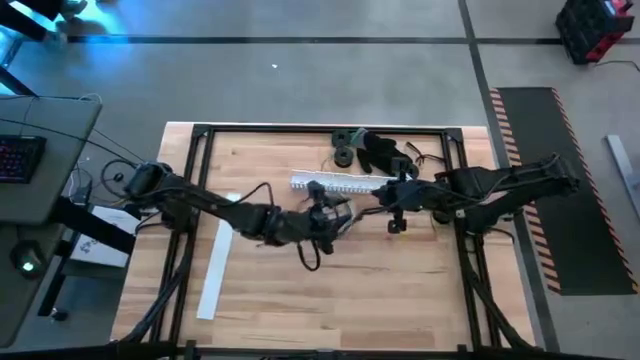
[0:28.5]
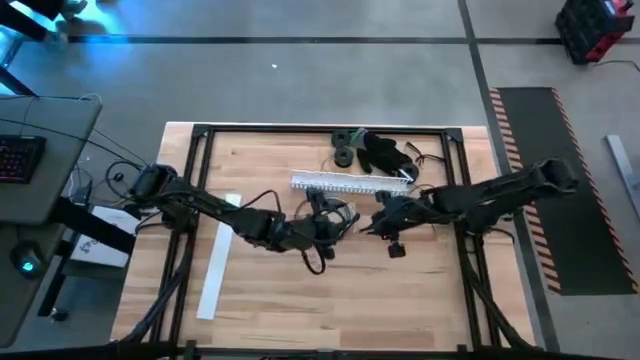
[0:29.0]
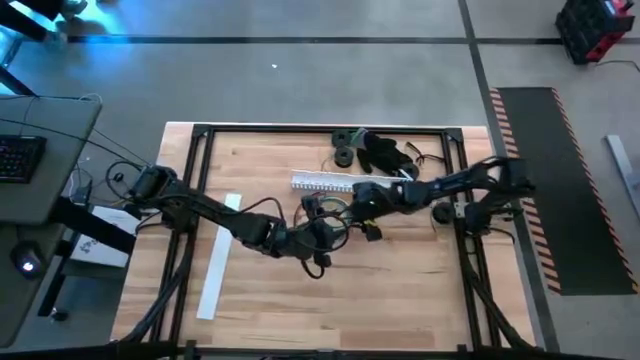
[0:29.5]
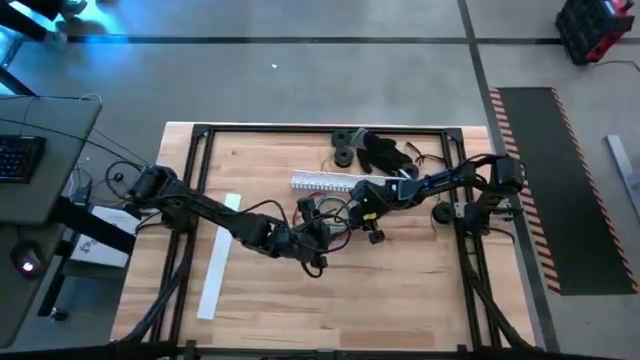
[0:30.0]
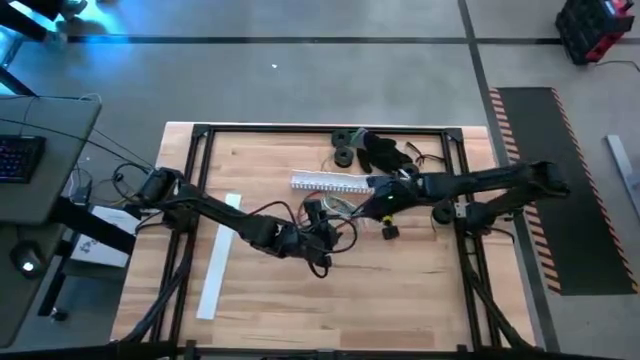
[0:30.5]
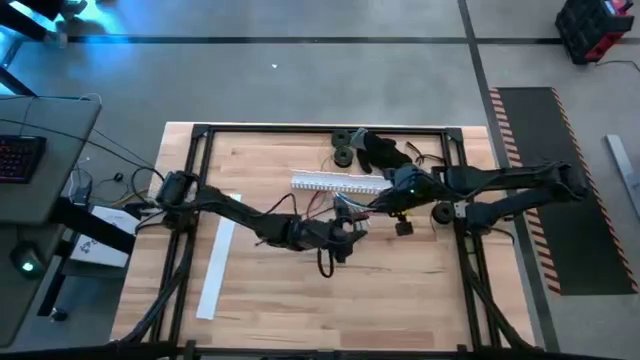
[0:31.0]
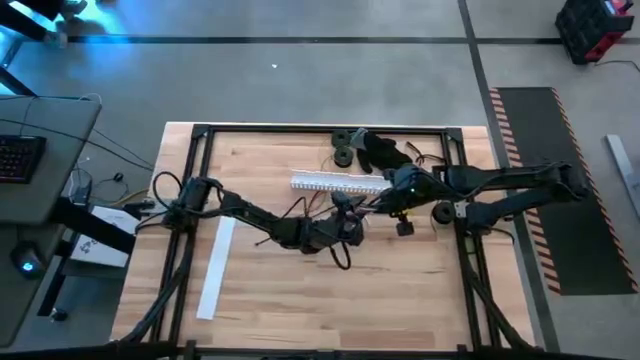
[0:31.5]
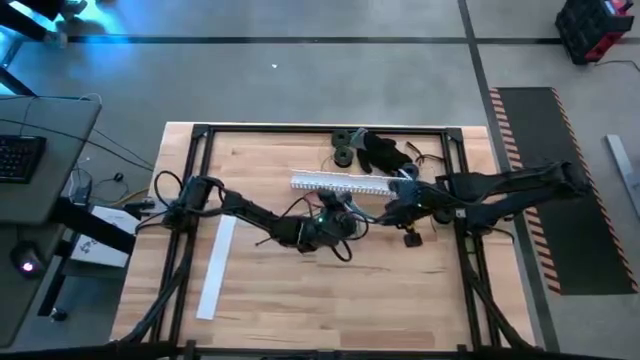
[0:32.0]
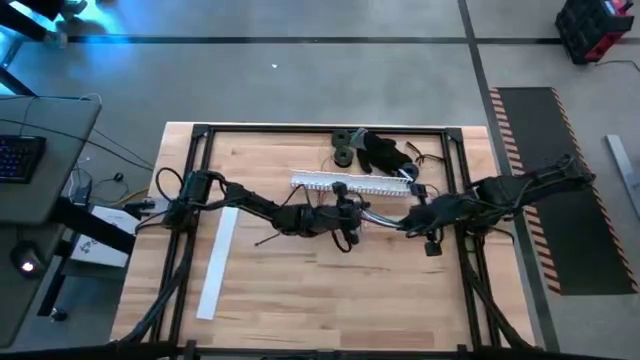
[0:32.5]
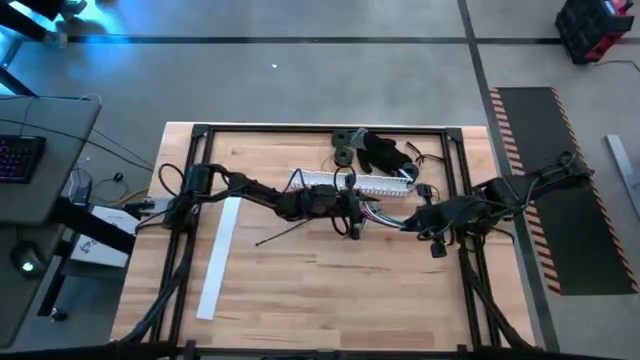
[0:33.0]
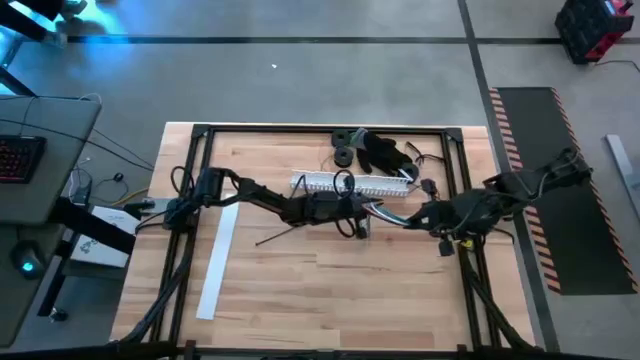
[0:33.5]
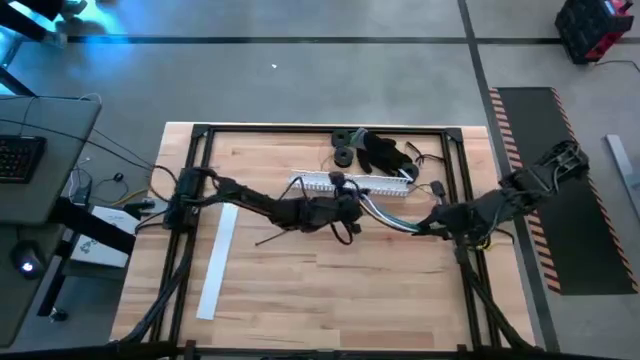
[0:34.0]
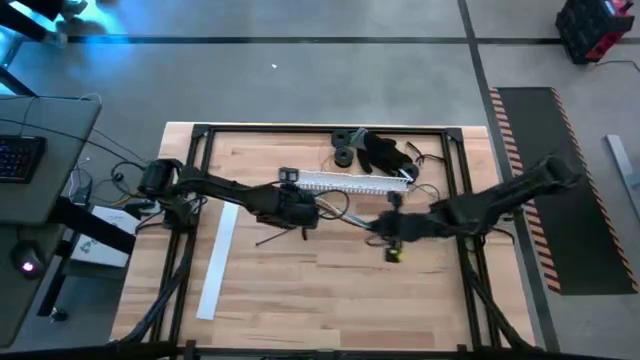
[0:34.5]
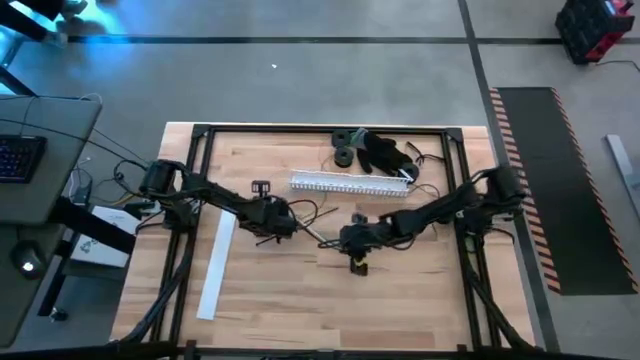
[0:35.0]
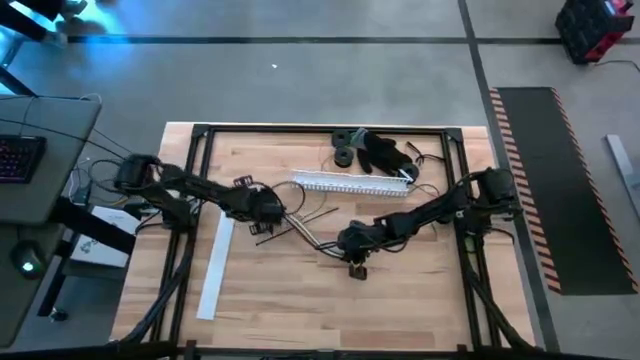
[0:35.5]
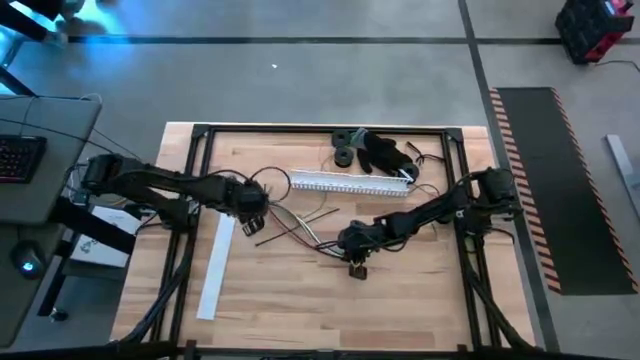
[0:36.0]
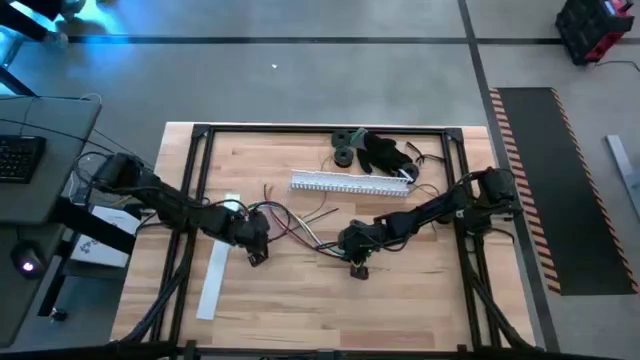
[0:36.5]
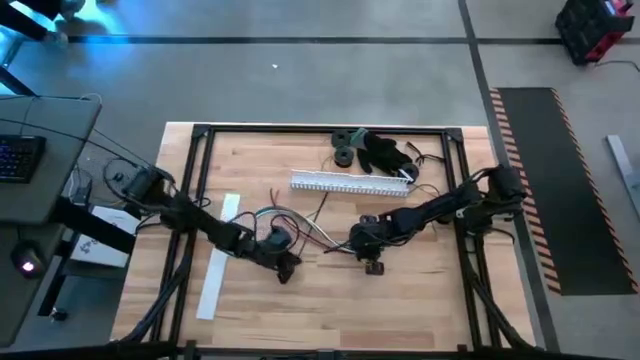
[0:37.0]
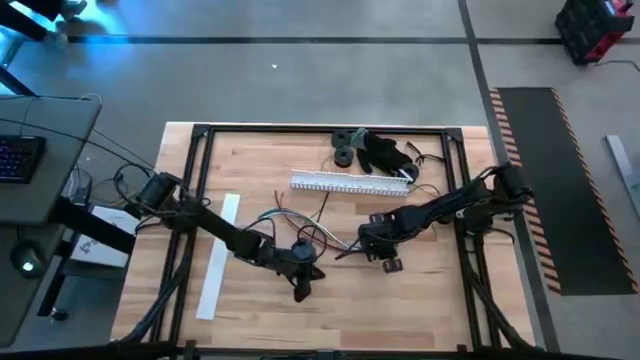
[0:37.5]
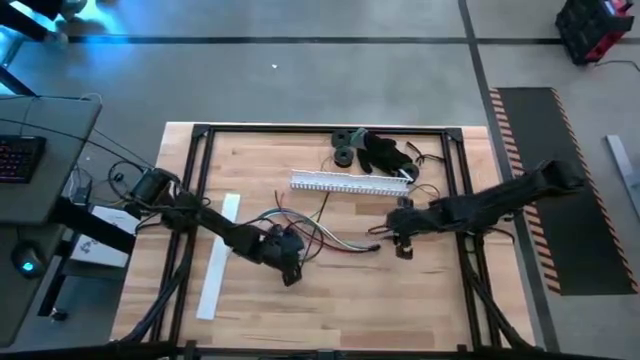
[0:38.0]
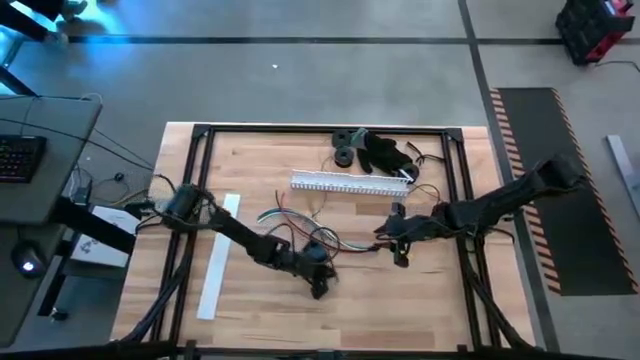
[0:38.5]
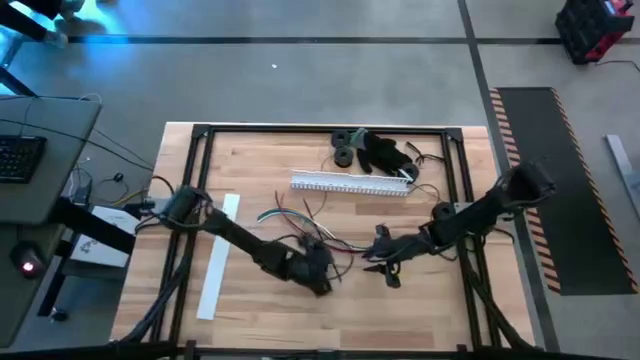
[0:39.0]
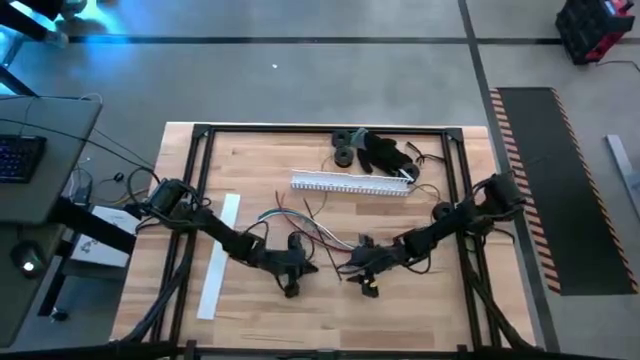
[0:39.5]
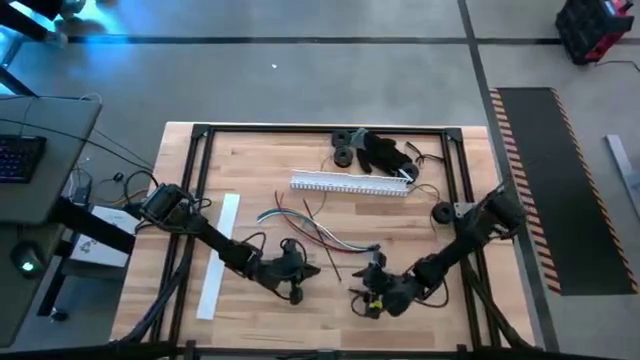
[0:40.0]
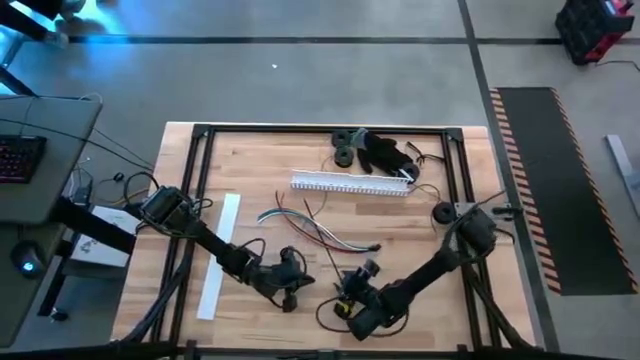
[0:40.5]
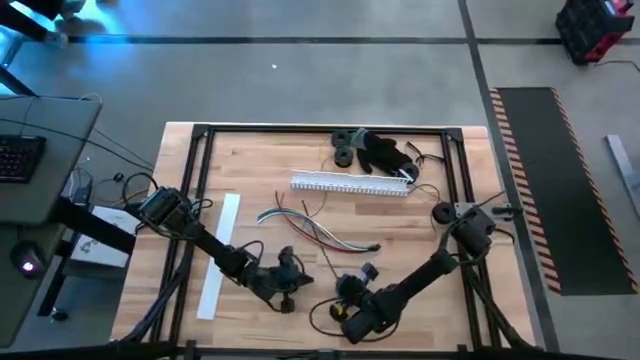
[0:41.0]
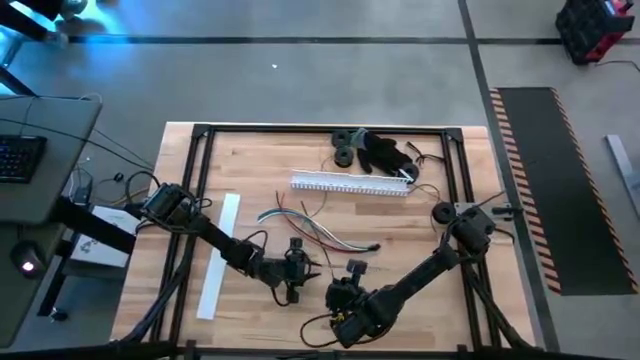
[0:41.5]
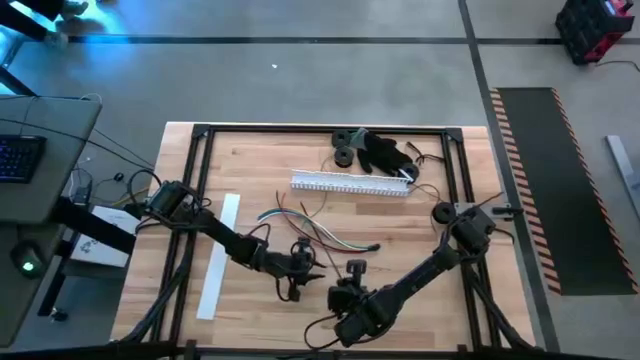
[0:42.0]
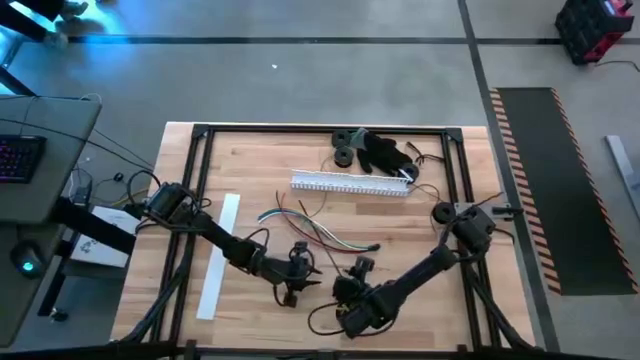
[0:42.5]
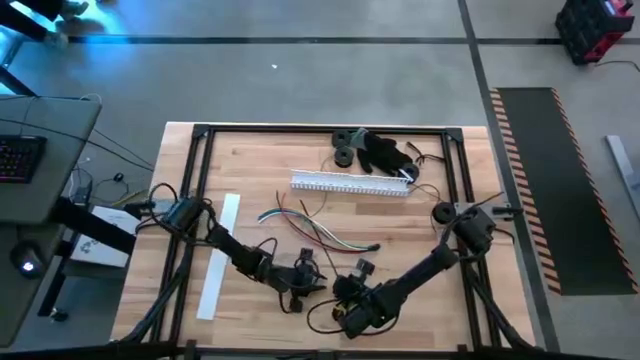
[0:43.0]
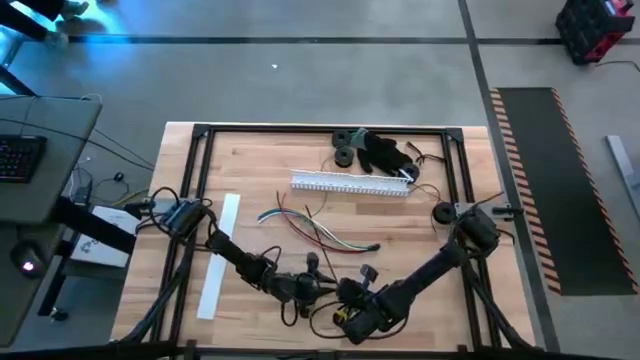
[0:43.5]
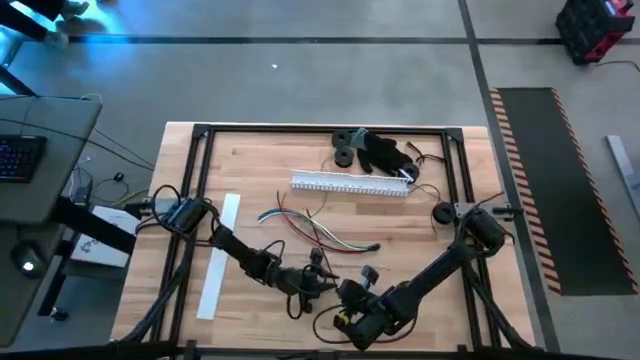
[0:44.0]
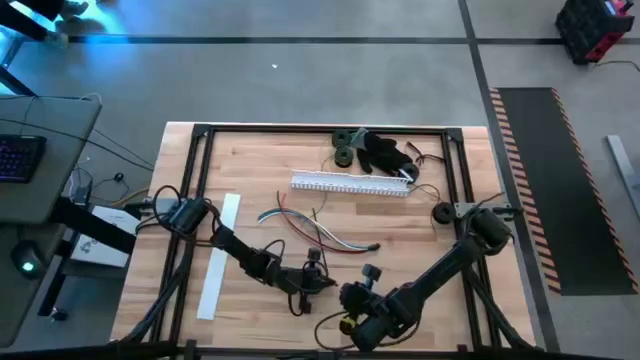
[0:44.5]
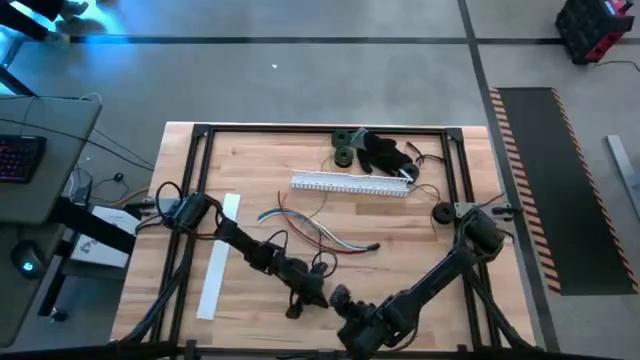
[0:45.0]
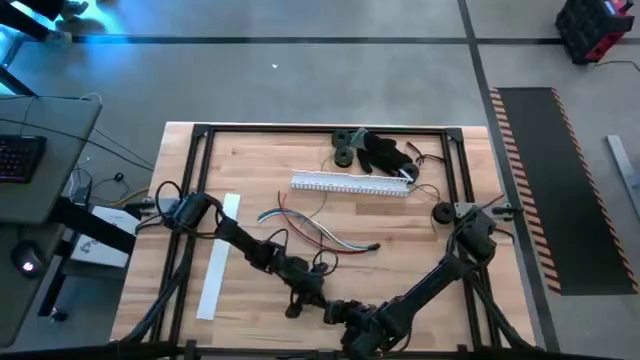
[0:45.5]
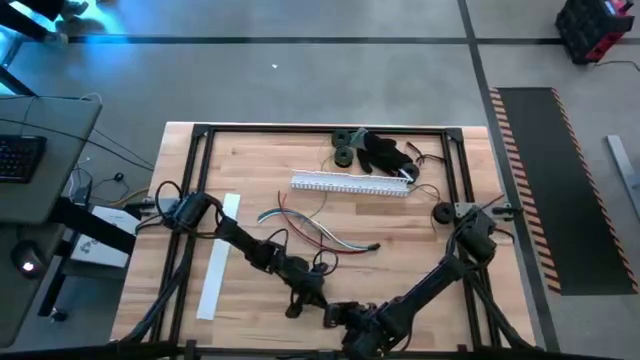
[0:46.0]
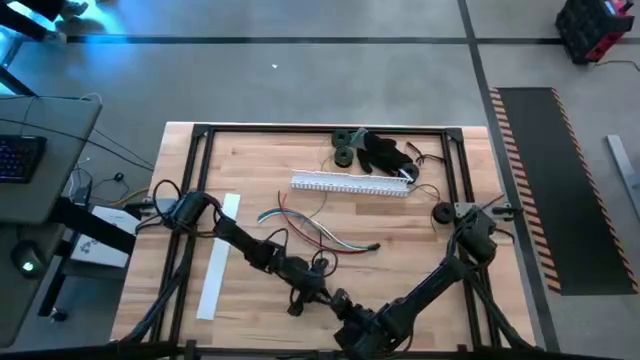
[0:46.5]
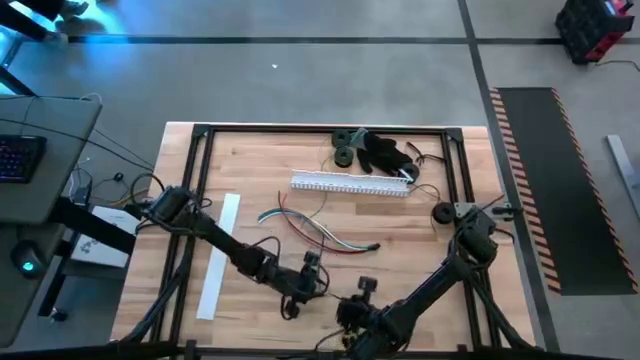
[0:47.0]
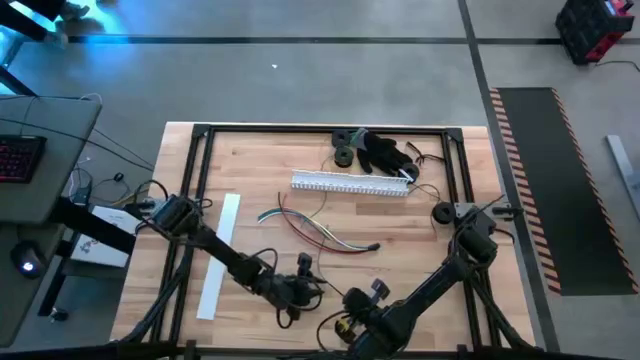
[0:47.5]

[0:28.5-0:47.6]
Task: Ziptie cables
Wrap the cable wire using a black zip tie
